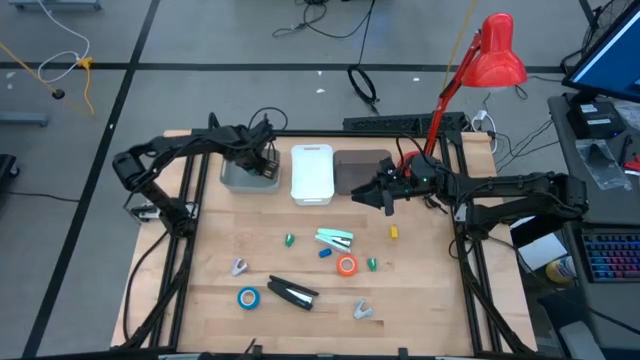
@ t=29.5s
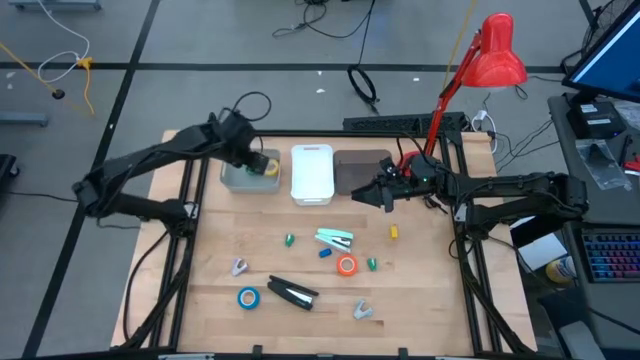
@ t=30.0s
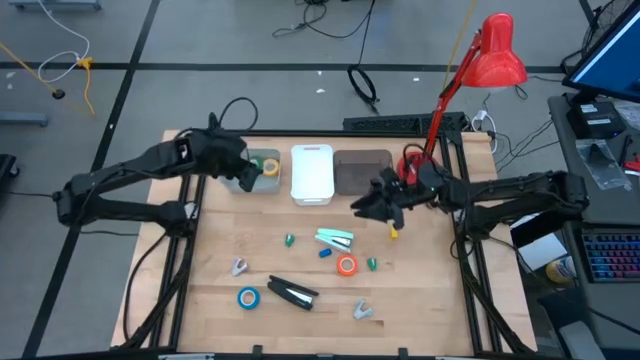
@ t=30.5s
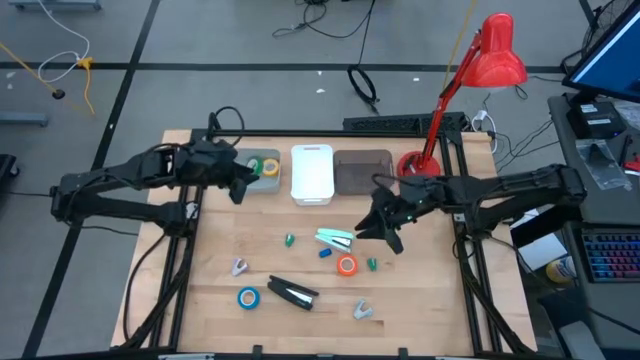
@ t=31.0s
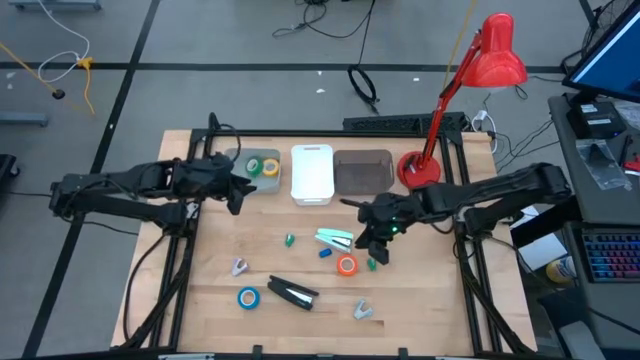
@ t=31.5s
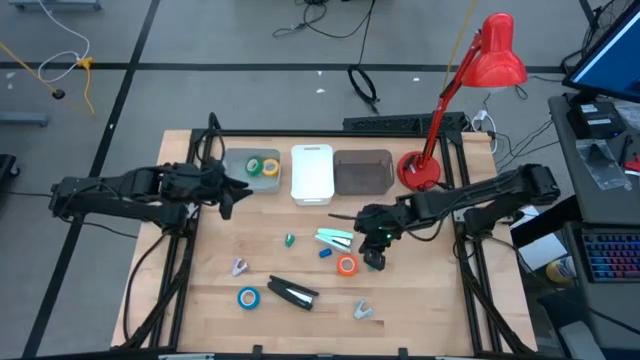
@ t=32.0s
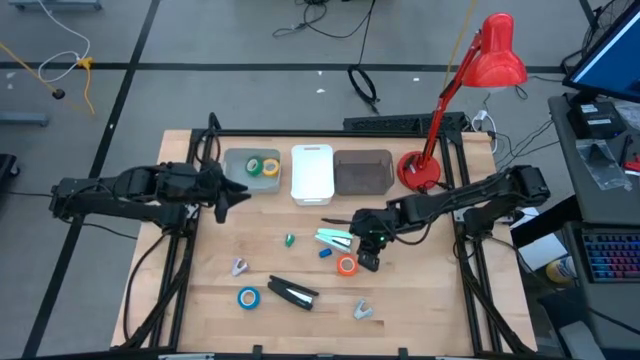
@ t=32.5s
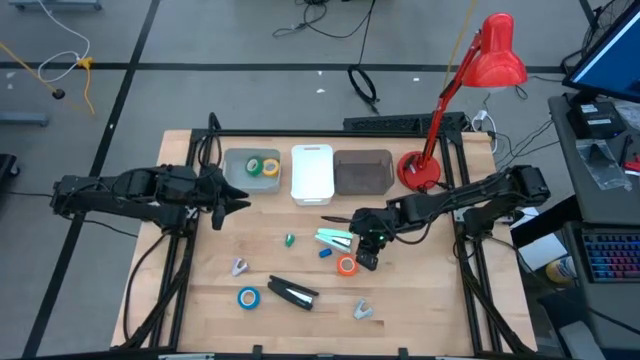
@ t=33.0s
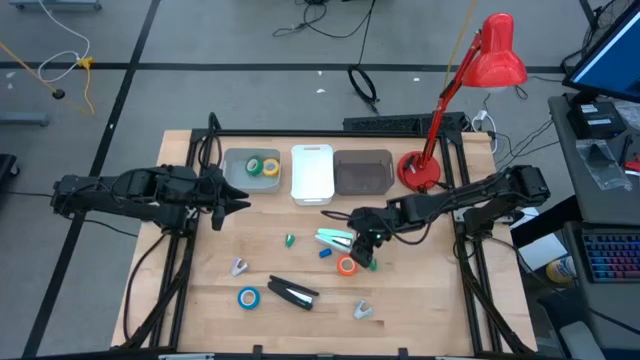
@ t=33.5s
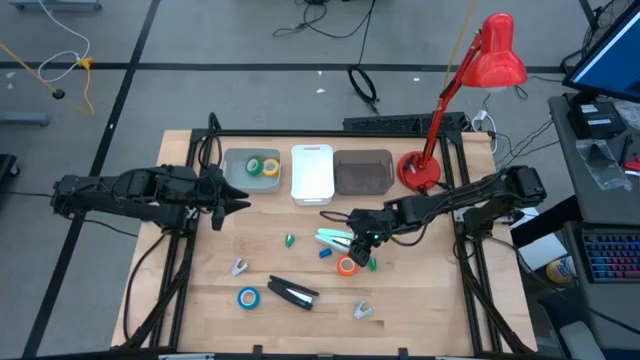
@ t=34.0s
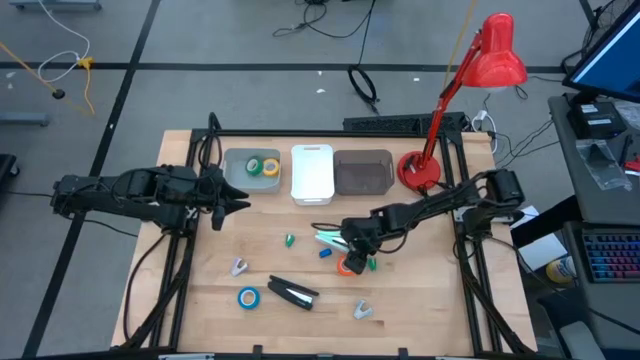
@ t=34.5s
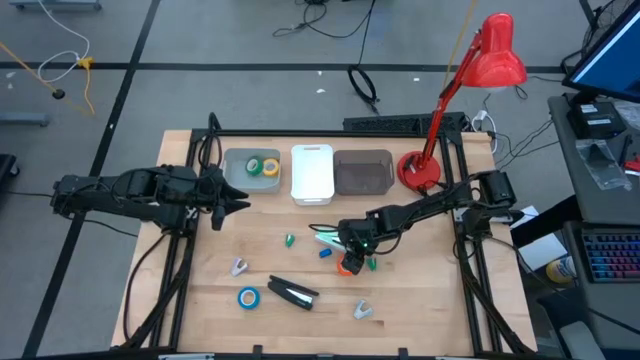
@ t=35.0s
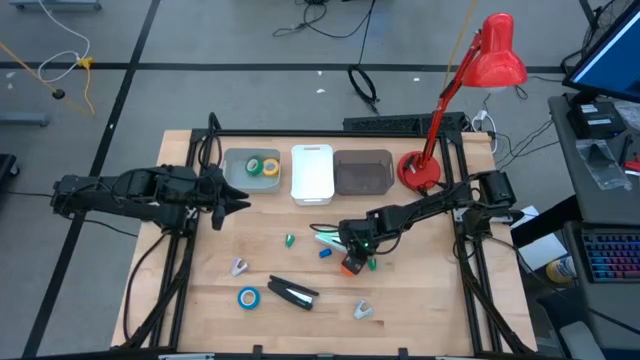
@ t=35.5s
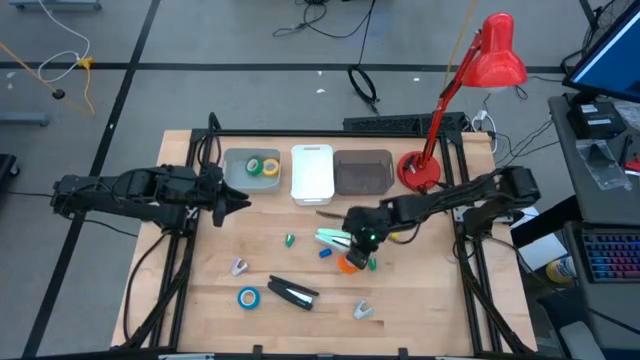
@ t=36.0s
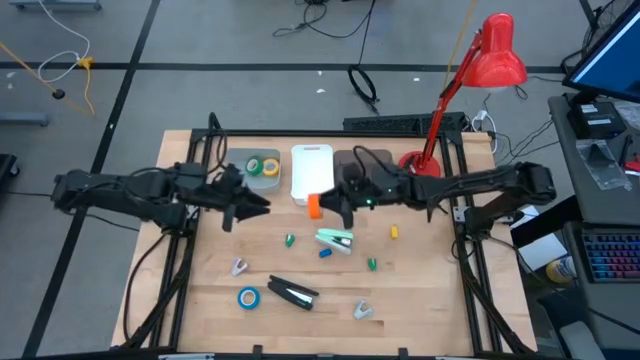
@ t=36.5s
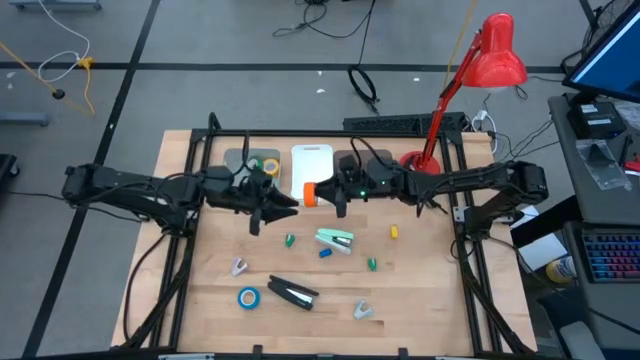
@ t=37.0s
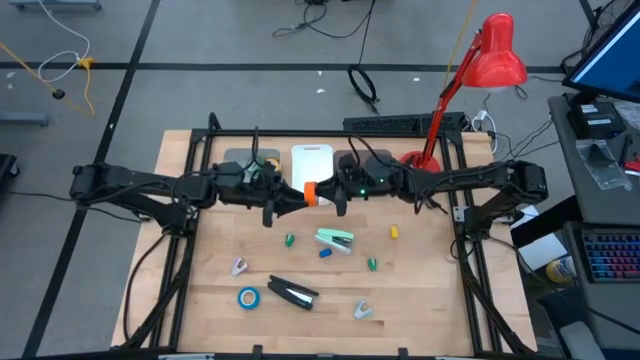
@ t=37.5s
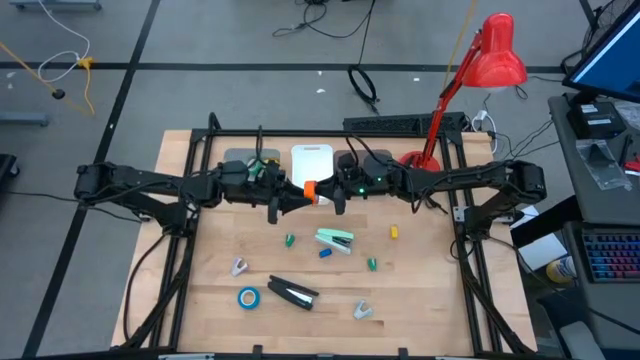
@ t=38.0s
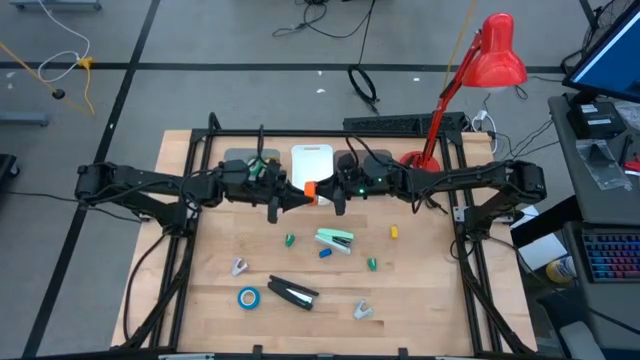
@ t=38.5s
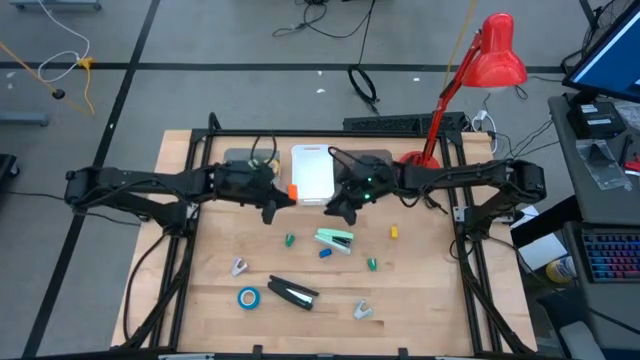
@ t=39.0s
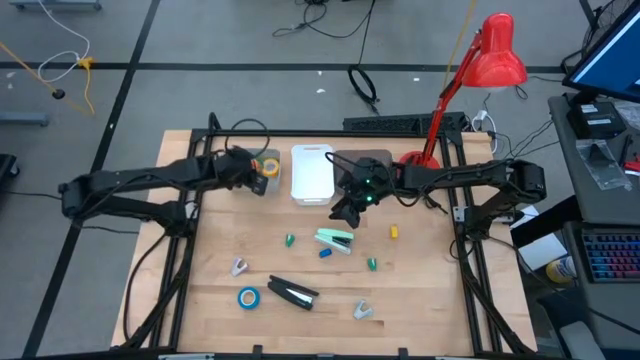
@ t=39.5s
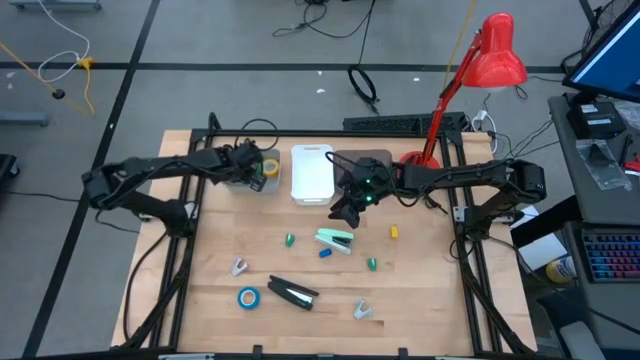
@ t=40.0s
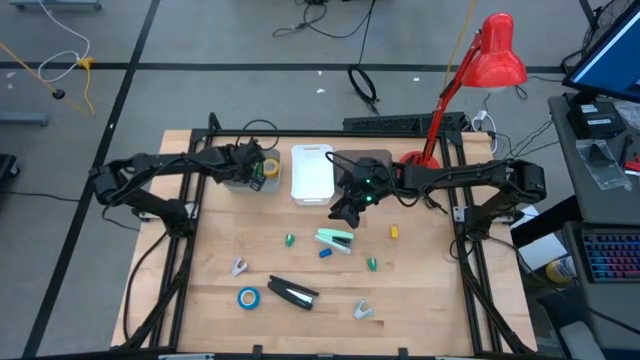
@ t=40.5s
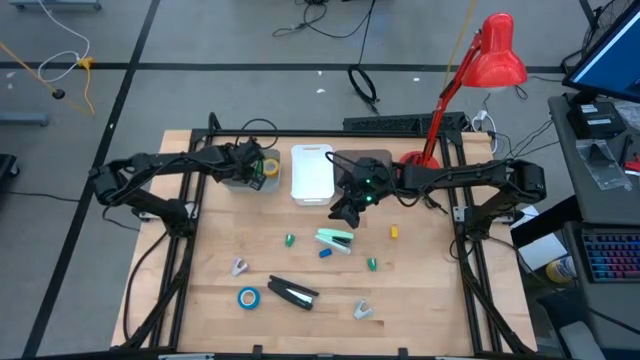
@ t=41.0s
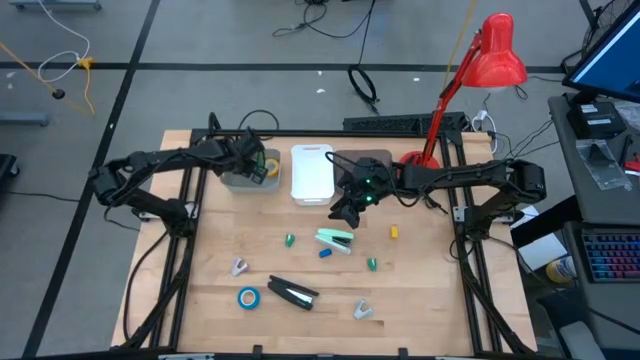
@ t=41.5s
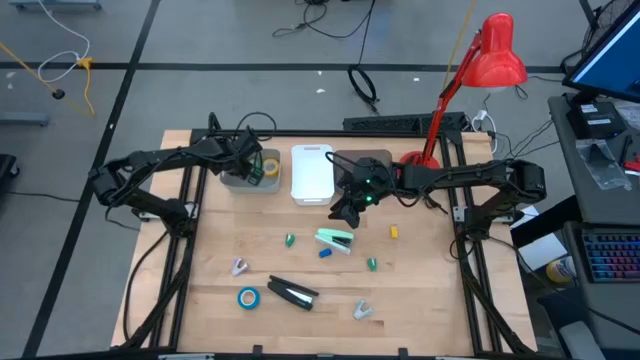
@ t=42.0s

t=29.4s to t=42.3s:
Task: Pick and place Stapler, Stapler remover, tape
Put the orange tape into the gray bin

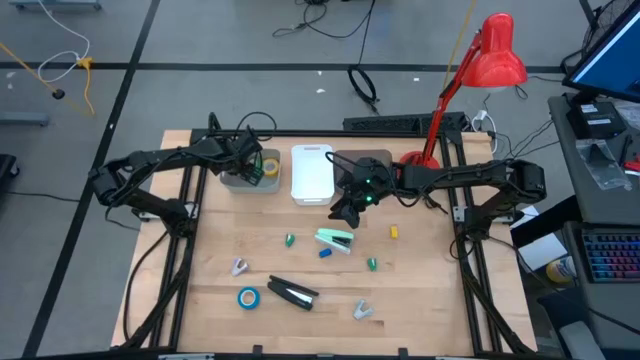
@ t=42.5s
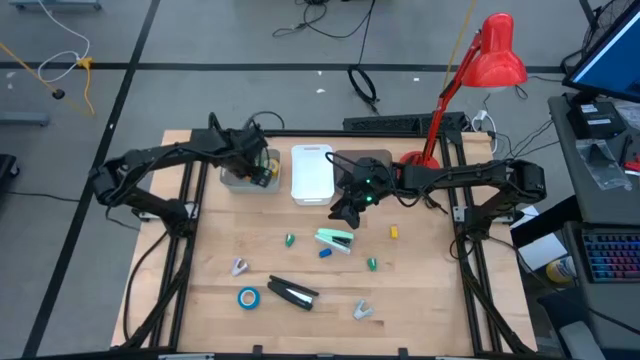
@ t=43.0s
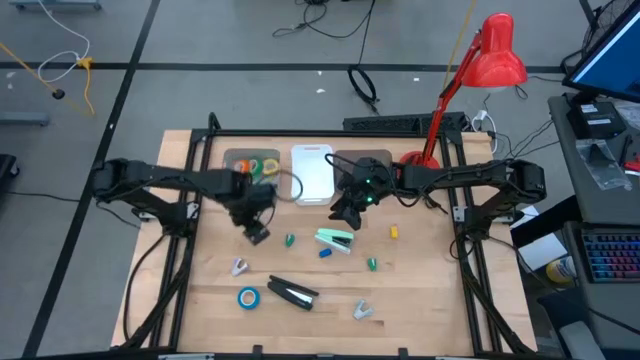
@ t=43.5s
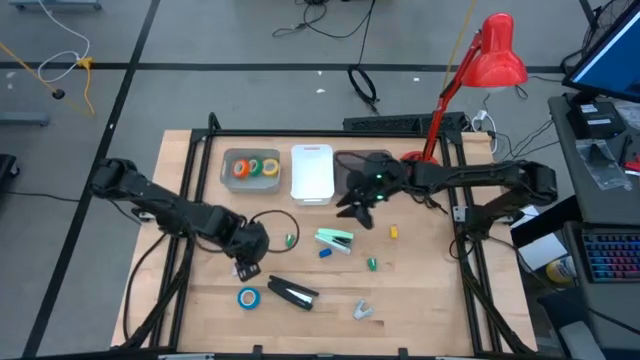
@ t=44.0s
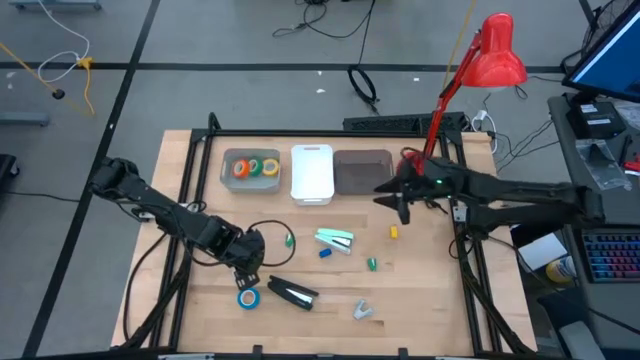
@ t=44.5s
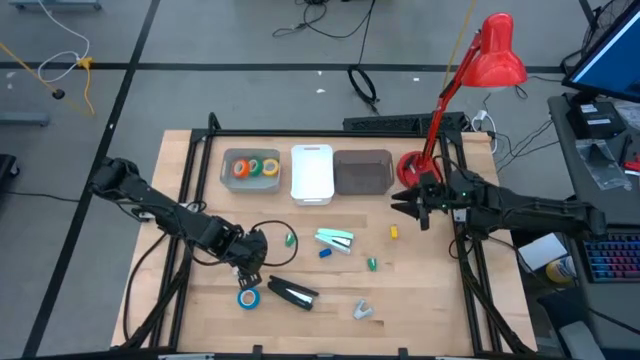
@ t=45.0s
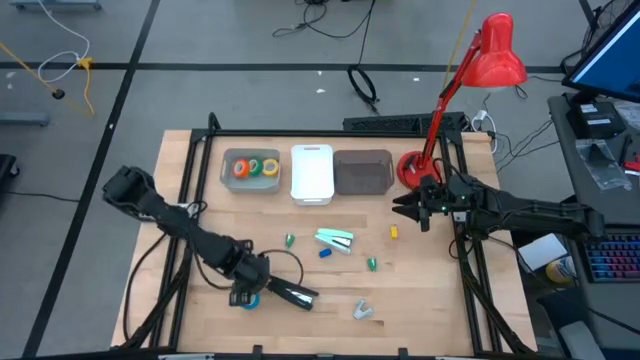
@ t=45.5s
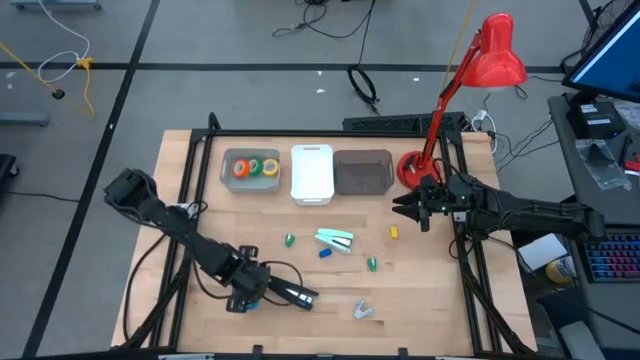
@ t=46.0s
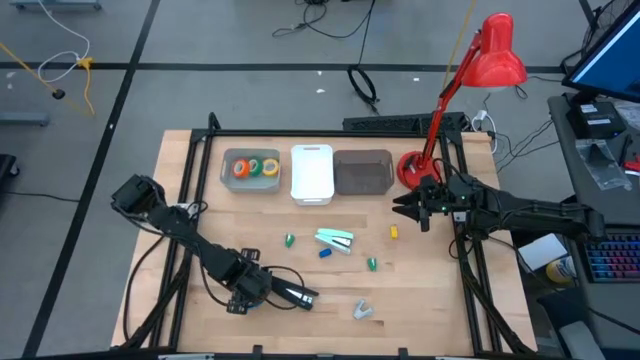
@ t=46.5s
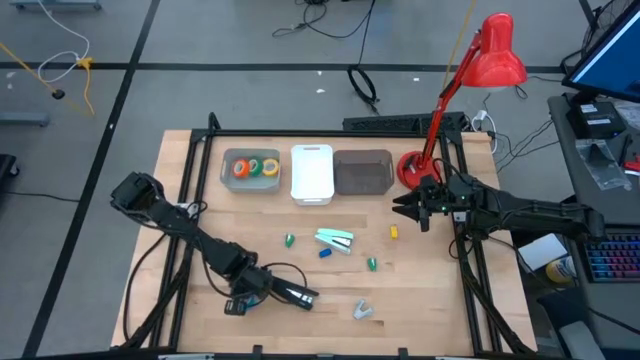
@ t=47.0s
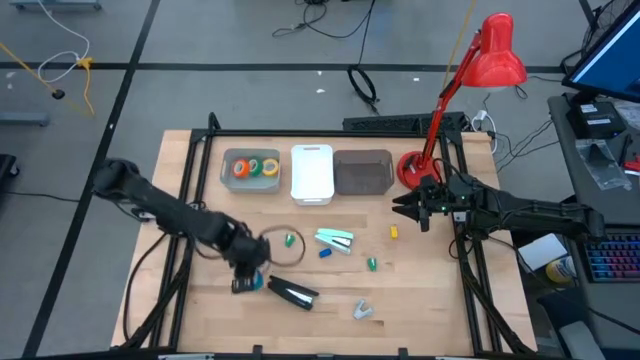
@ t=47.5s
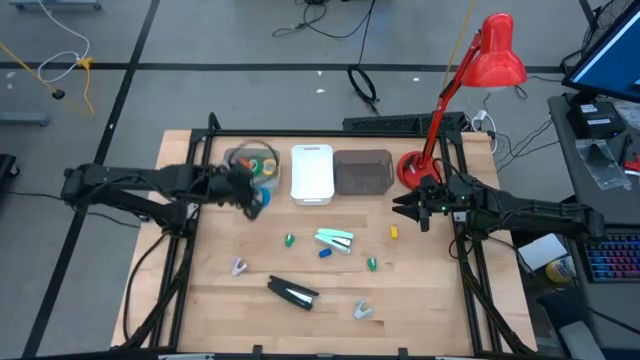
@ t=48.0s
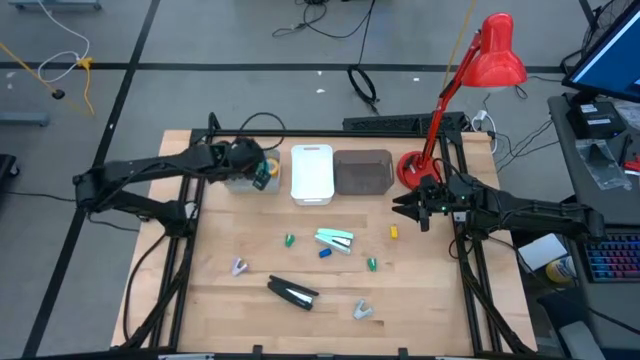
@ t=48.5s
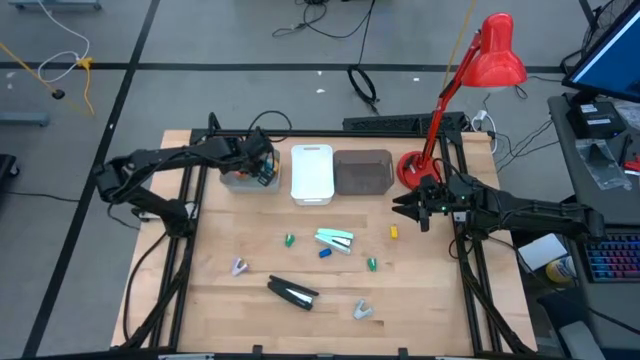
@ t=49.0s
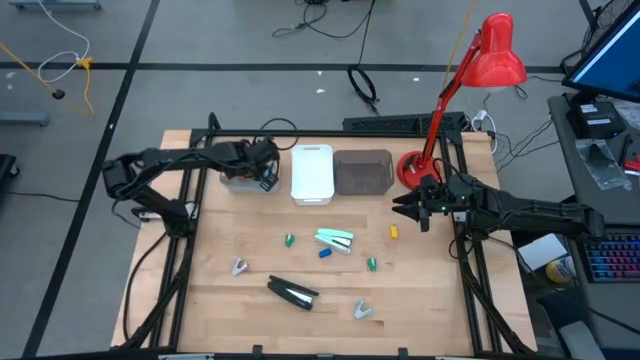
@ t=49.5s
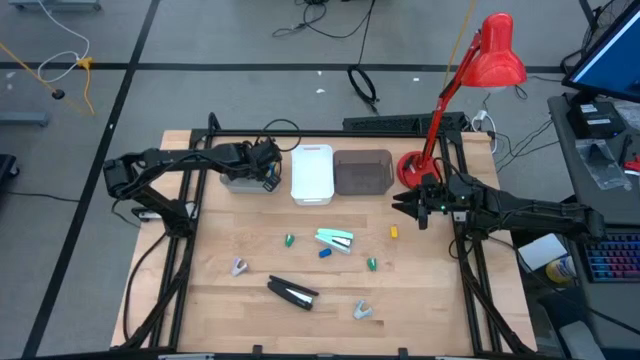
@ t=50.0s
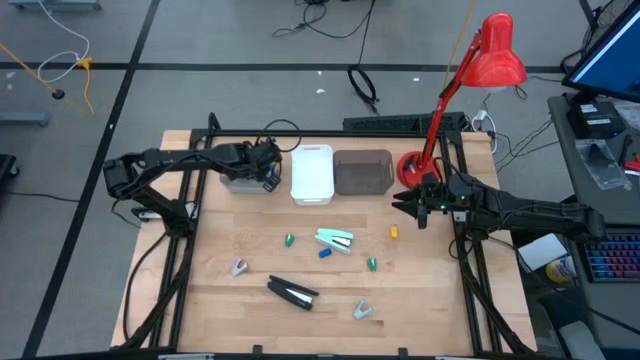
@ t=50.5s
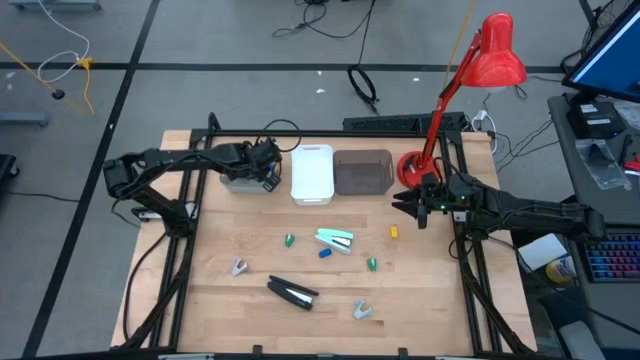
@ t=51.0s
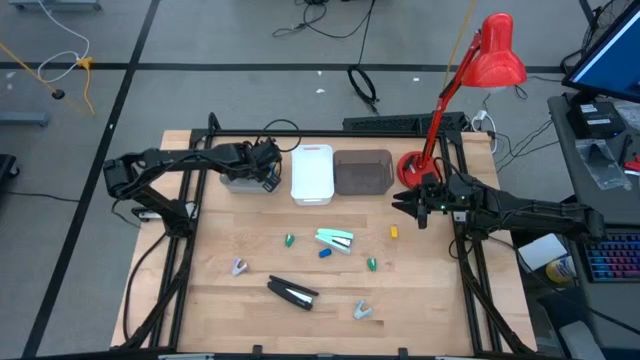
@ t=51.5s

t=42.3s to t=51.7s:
Put the blue tape into the gray bin
